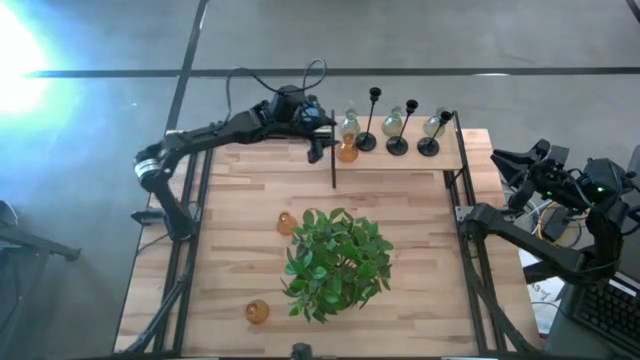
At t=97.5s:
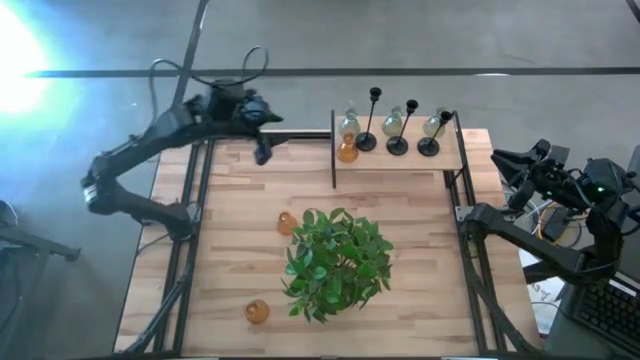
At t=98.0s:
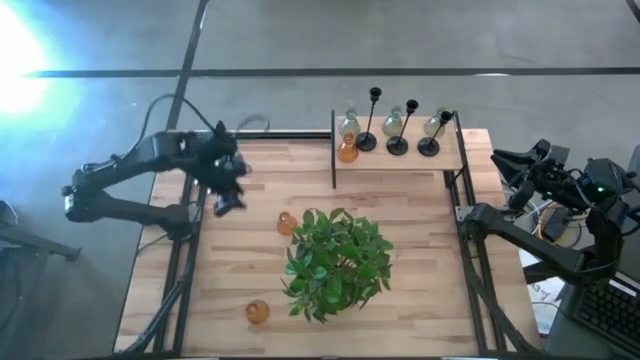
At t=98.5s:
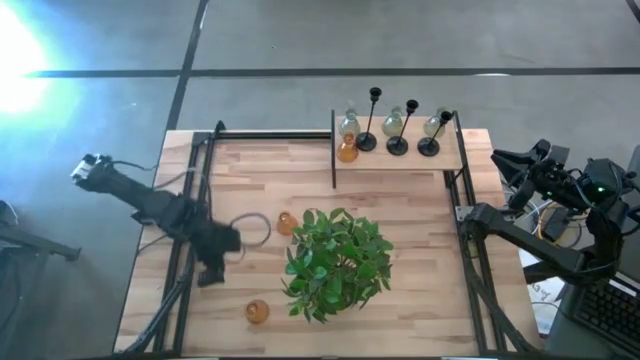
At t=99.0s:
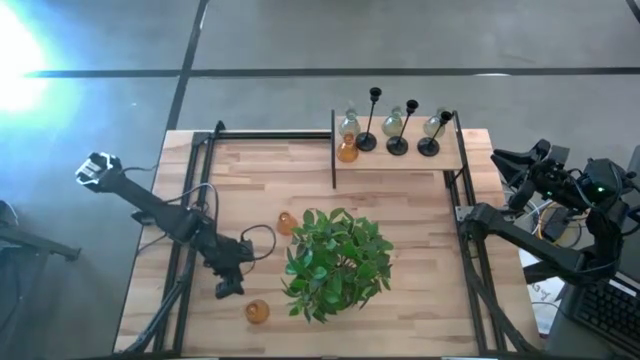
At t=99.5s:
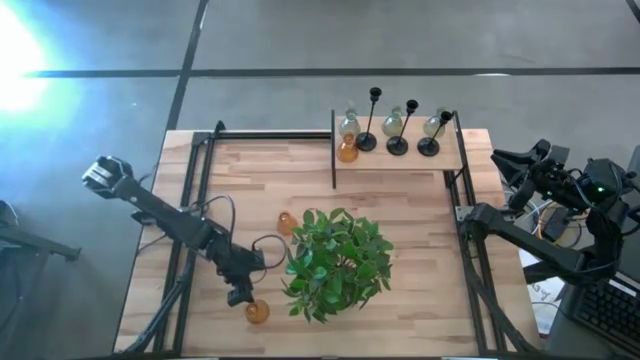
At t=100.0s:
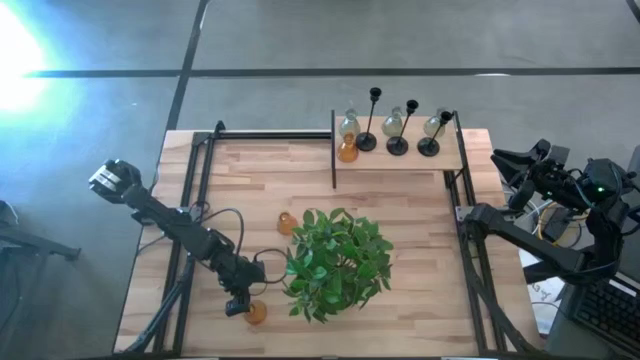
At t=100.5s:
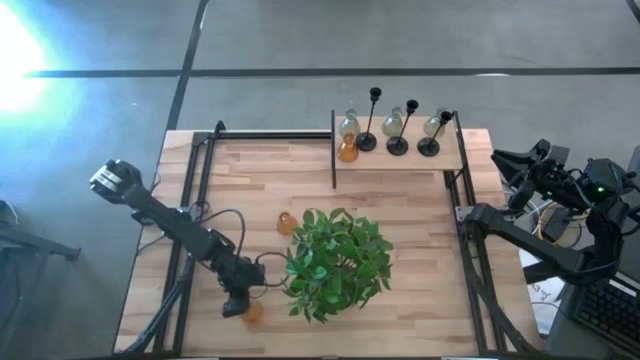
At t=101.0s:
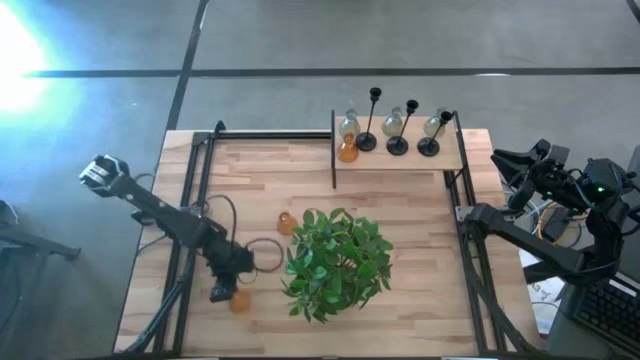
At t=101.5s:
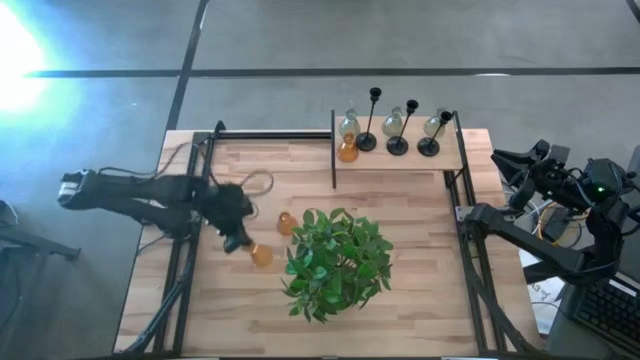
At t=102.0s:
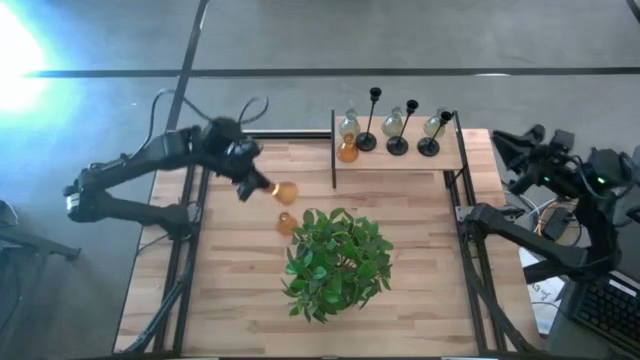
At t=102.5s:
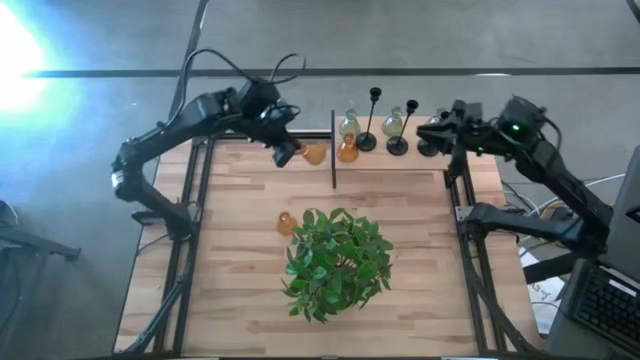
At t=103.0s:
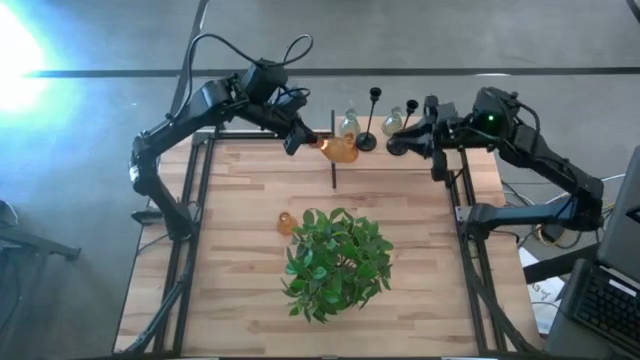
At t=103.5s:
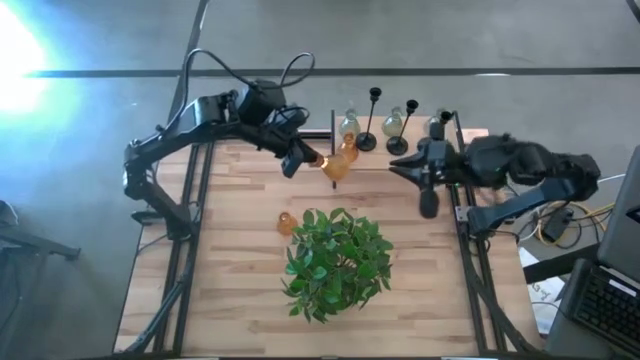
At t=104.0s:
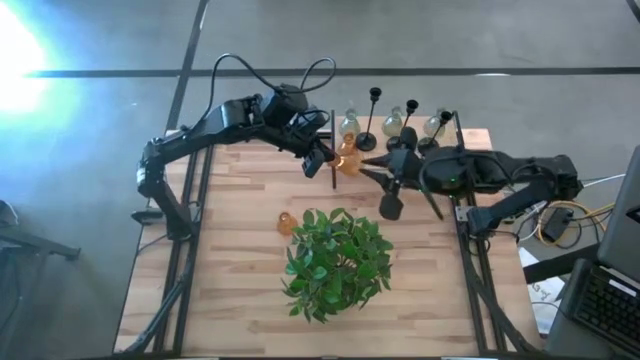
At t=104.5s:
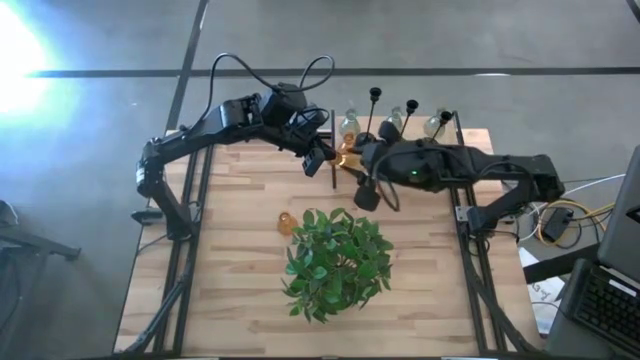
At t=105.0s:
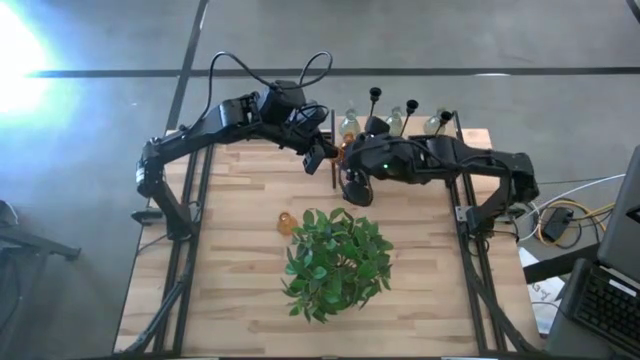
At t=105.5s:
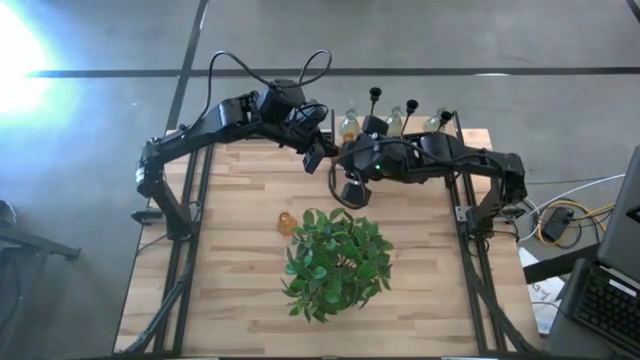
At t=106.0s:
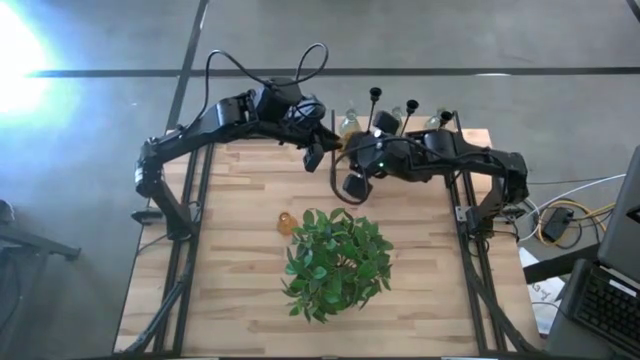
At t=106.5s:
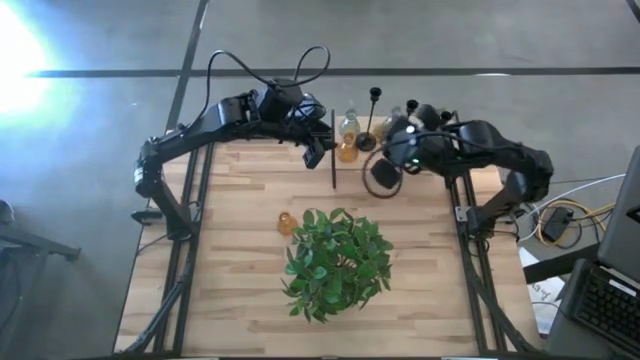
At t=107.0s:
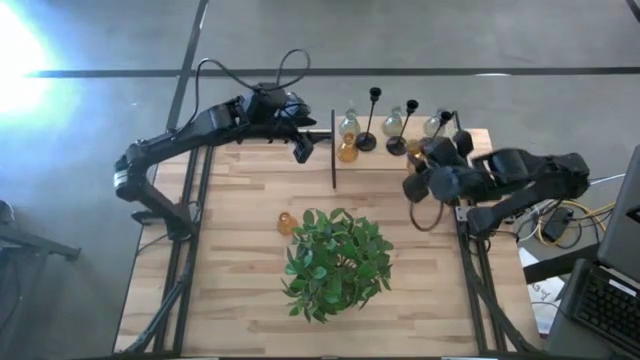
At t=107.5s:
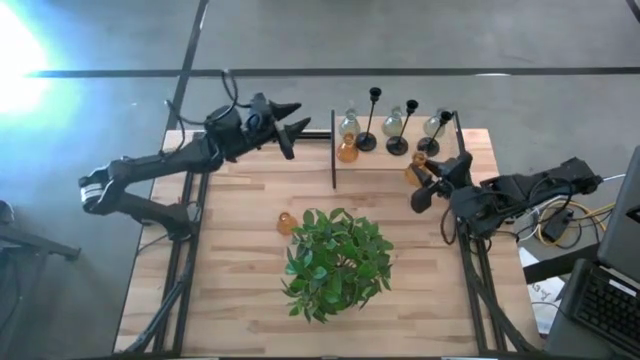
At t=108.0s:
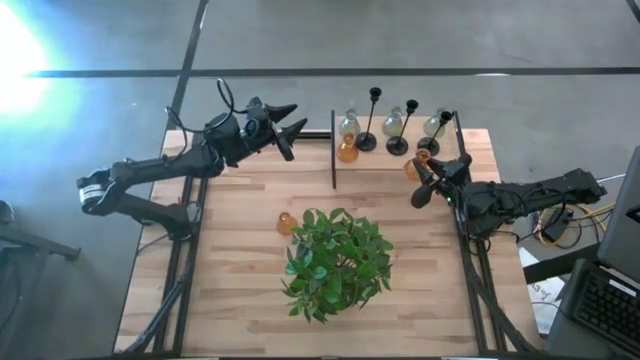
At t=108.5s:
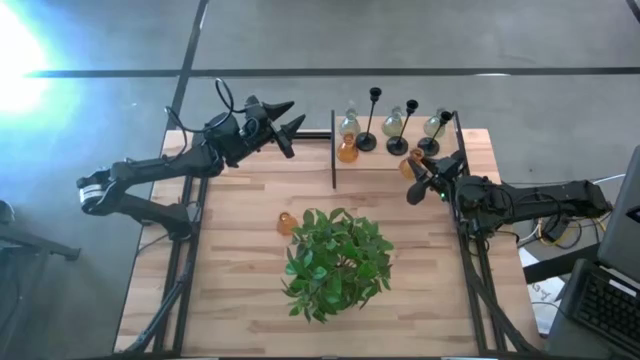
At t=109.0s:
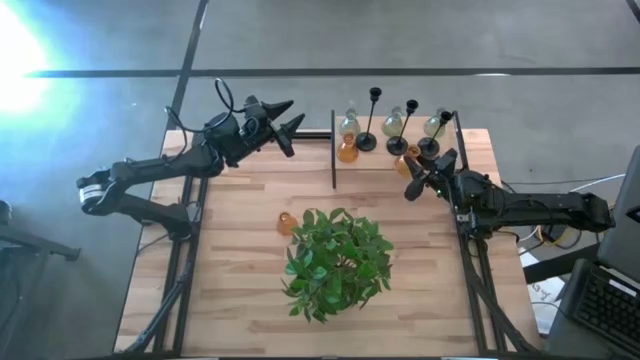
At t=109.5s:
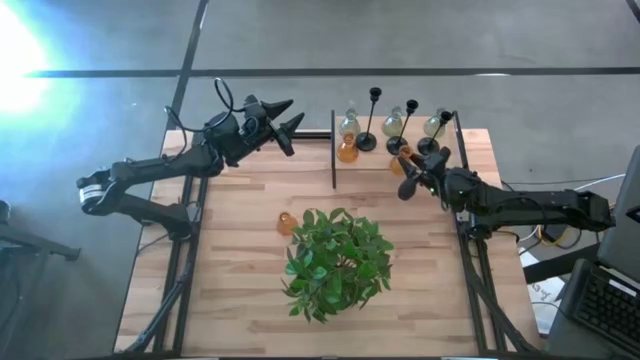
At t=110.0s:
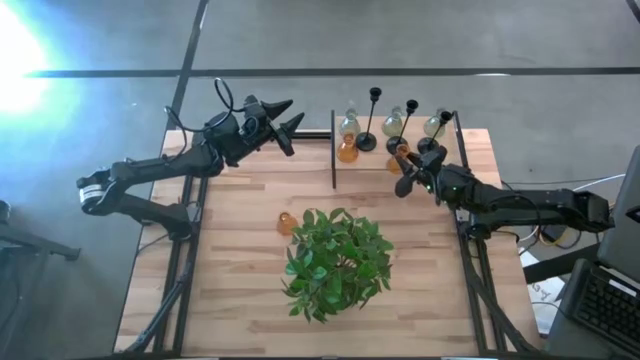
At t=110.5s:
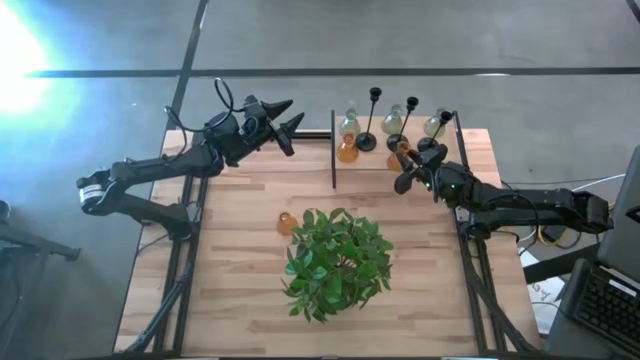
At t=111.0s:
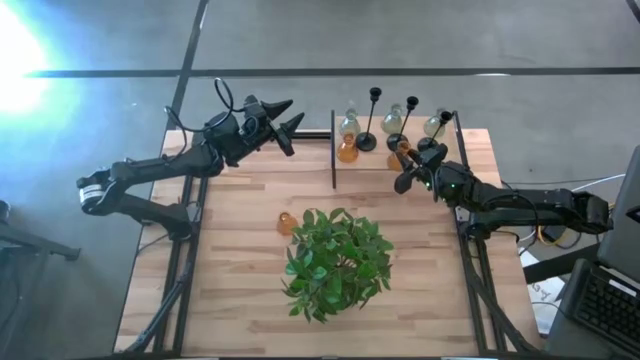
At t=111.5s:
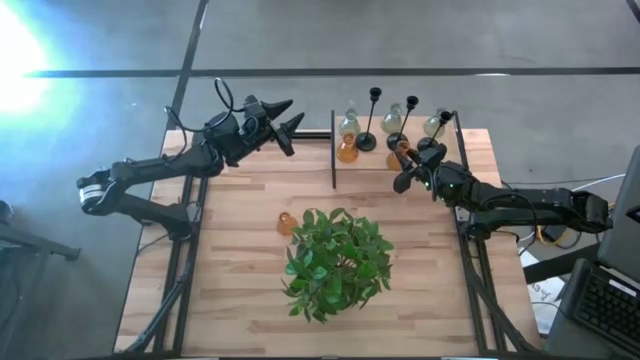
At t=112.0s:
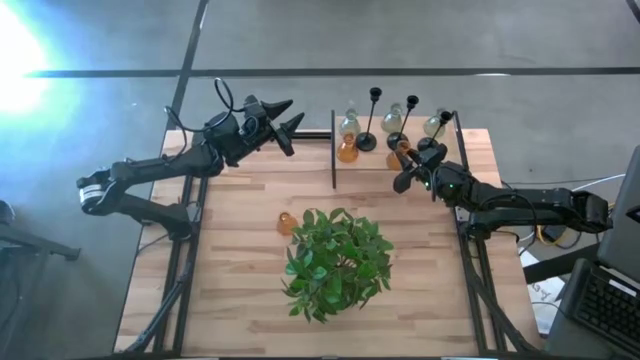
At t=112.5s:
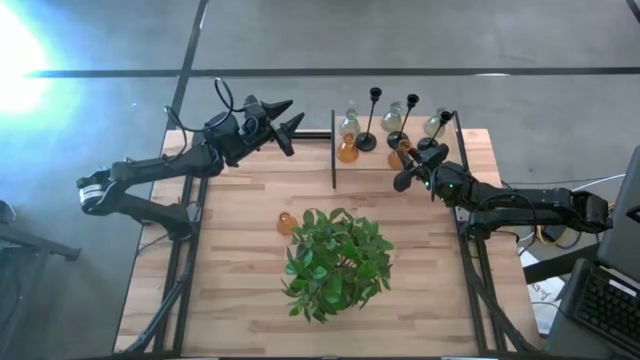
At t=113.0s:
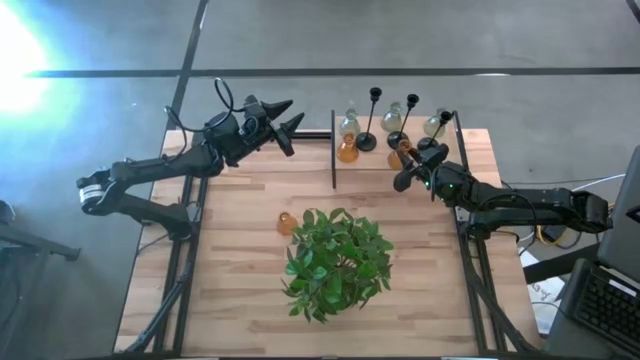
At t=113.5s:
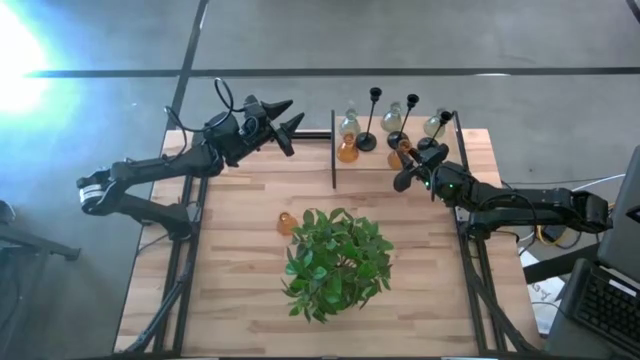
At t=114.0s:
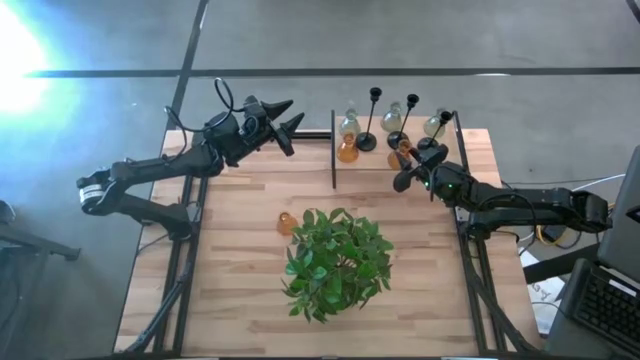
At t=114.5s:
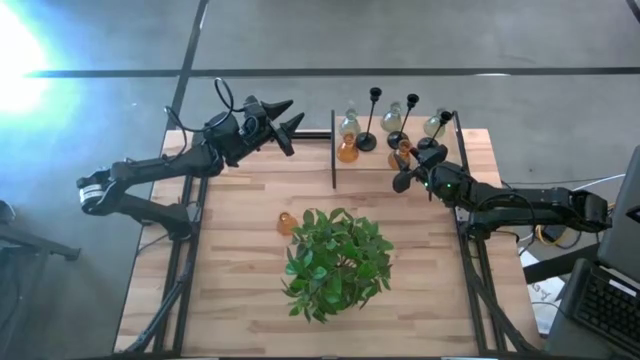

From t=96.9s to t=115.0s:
Task: Pick & Place candle stick holders
Put the bottom yellow glass candle holder on the shelf

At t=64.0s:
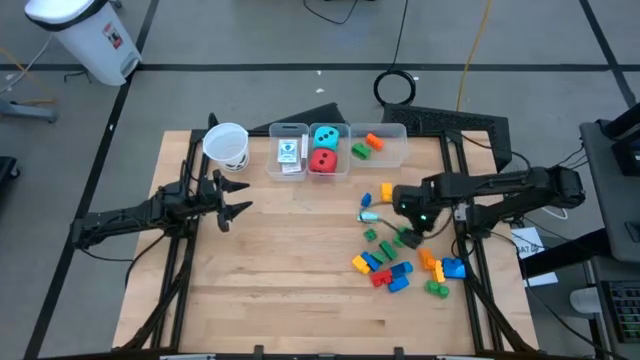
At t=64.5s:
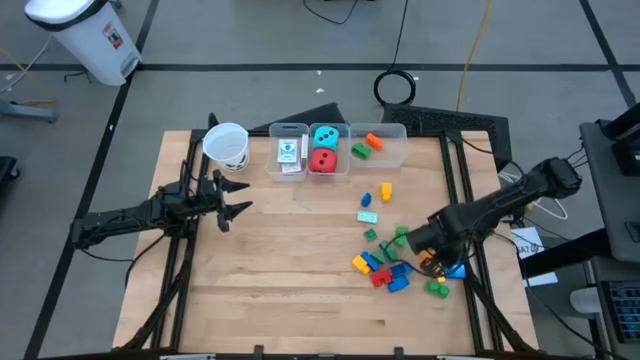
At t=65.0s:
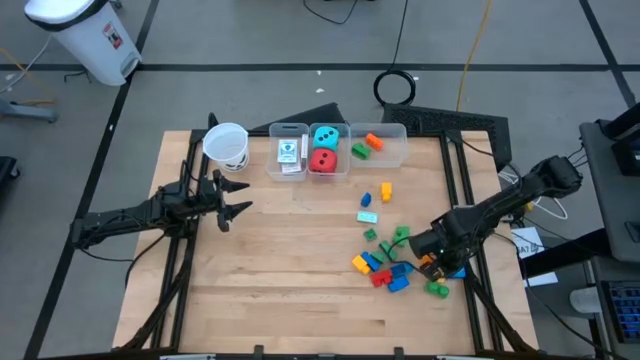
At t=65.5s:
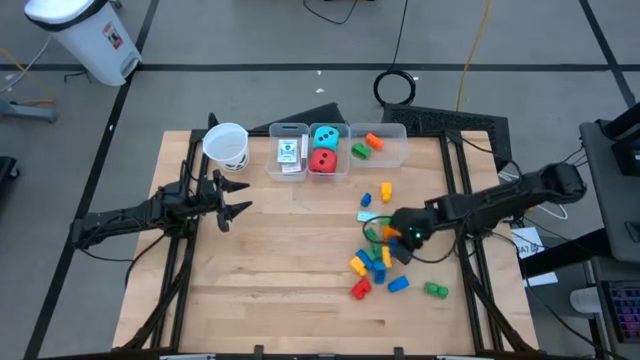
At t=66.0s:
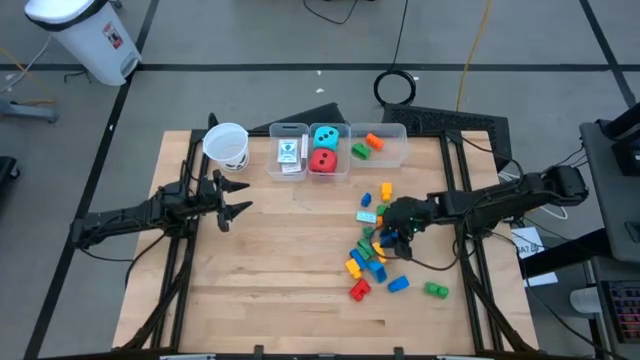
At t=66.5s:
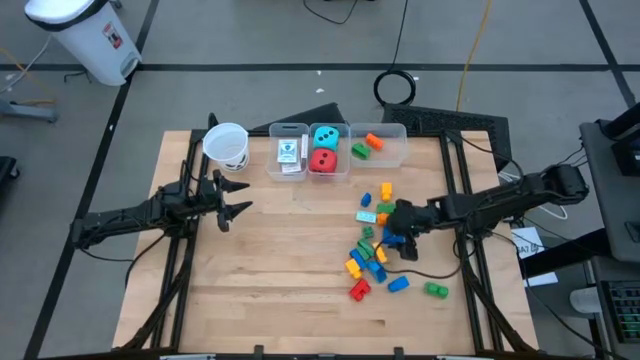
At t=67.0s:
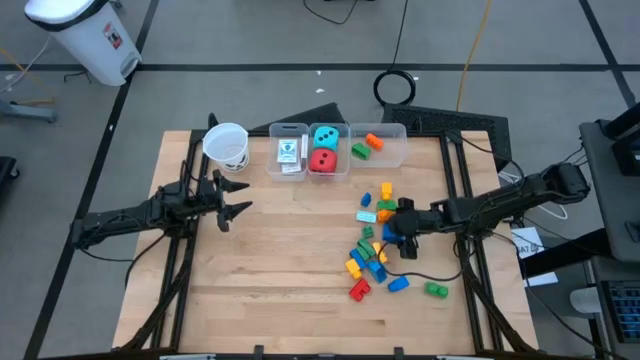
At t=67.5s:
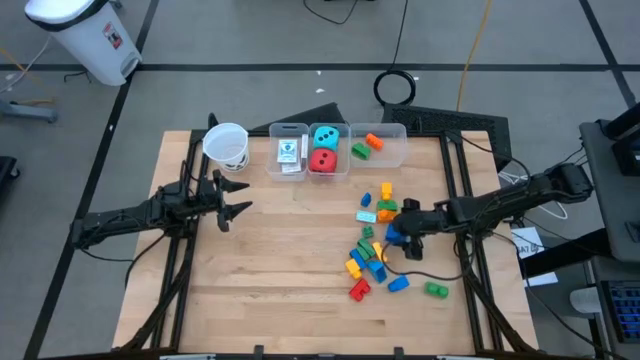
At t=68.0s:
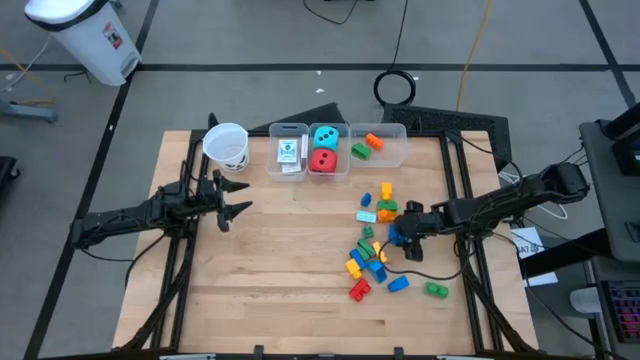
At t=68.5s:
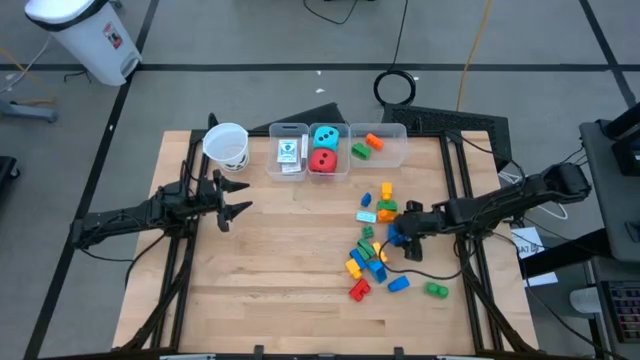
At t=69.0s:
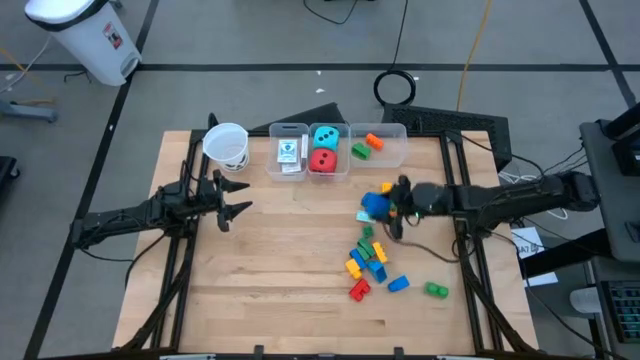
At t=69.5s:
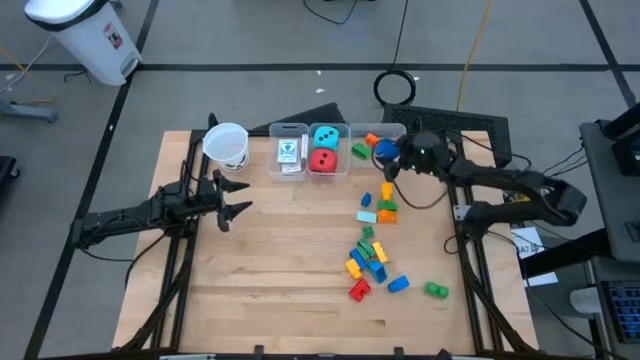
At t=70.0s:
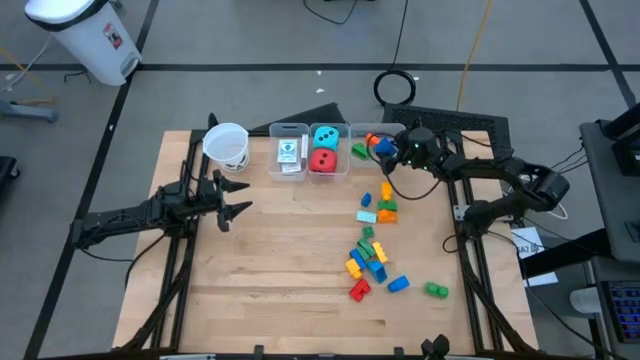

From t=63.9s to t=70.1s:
Task: Pick & Place Toys
Put the blue game piece into the right transparent bin
